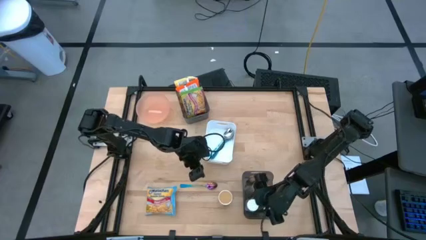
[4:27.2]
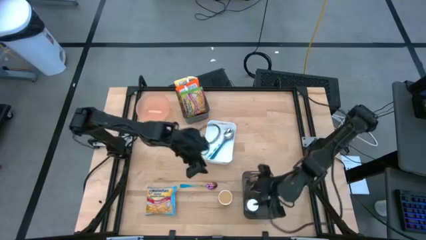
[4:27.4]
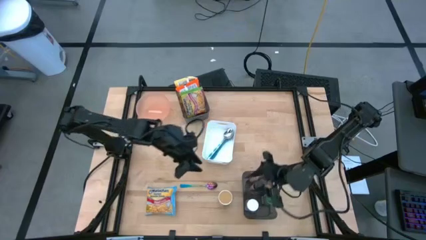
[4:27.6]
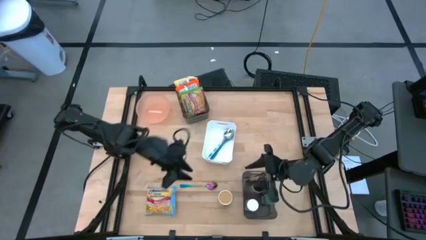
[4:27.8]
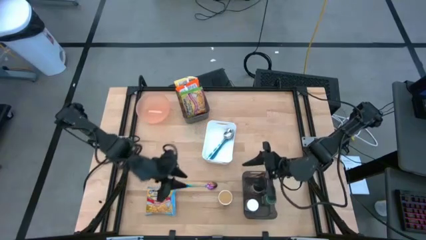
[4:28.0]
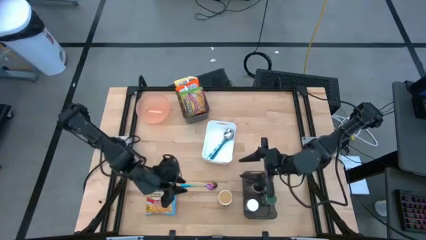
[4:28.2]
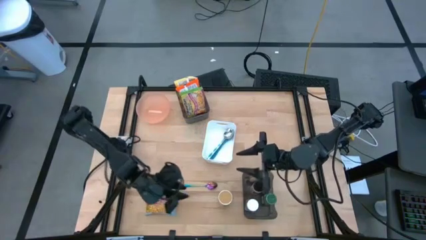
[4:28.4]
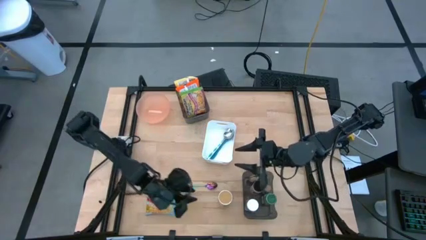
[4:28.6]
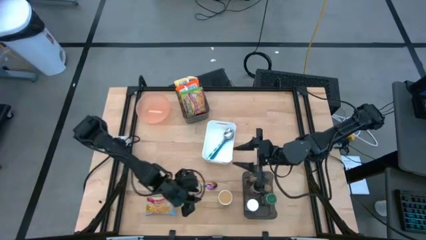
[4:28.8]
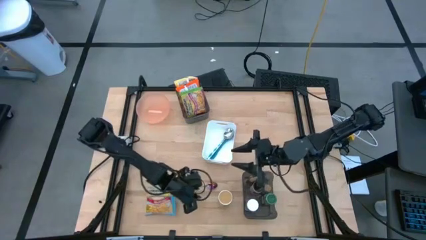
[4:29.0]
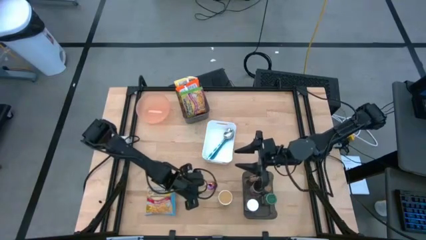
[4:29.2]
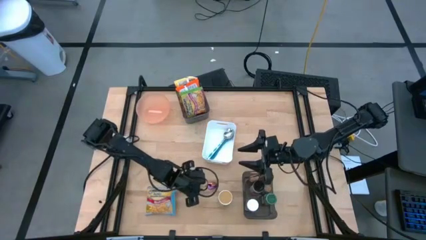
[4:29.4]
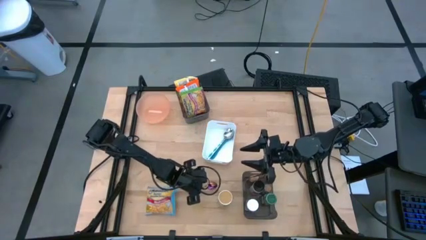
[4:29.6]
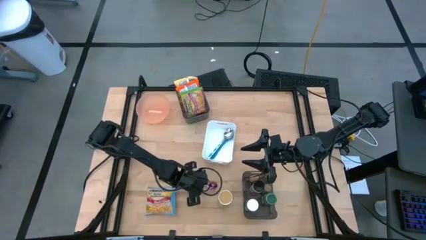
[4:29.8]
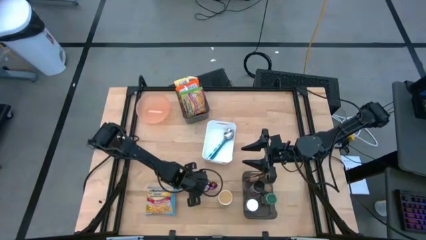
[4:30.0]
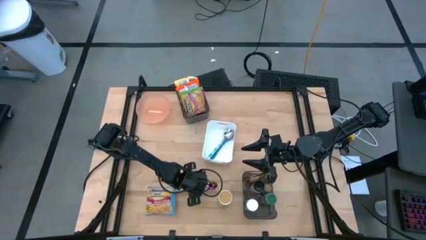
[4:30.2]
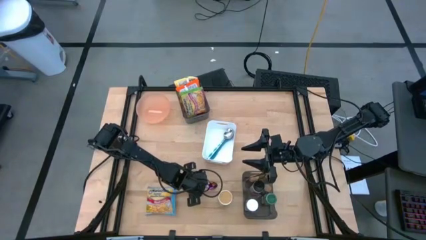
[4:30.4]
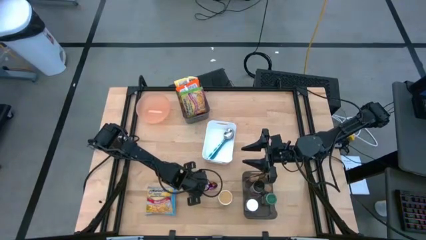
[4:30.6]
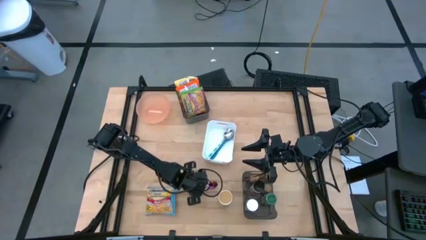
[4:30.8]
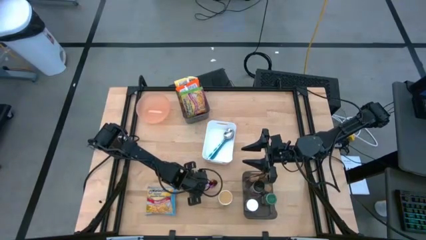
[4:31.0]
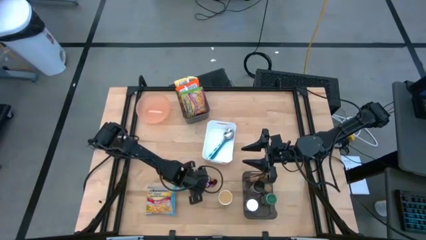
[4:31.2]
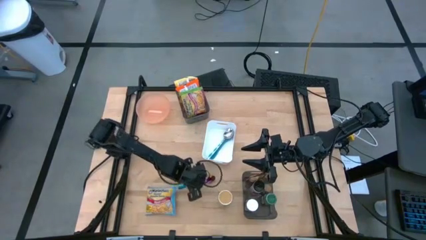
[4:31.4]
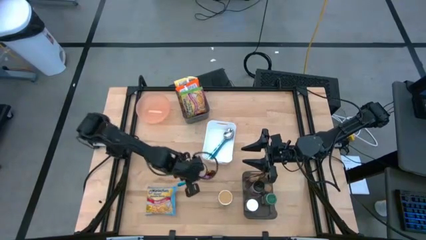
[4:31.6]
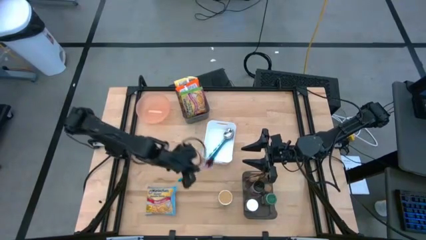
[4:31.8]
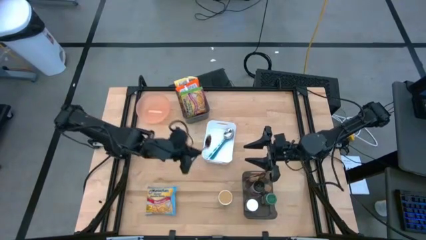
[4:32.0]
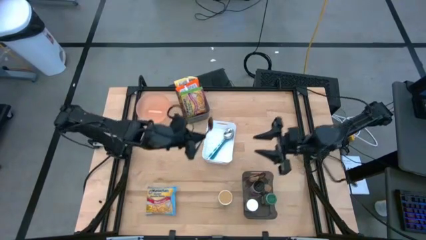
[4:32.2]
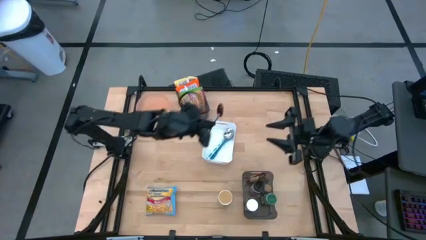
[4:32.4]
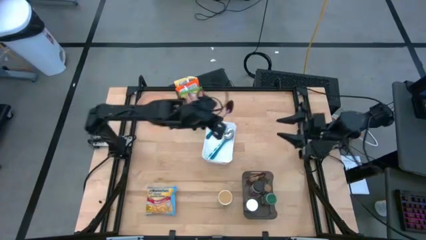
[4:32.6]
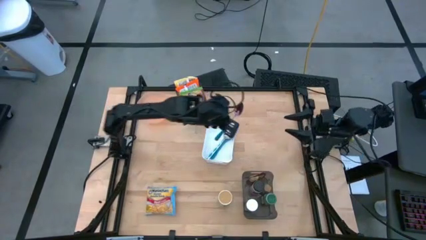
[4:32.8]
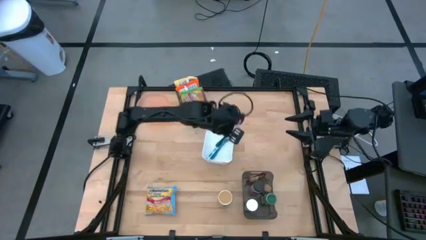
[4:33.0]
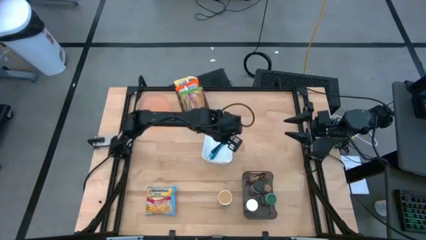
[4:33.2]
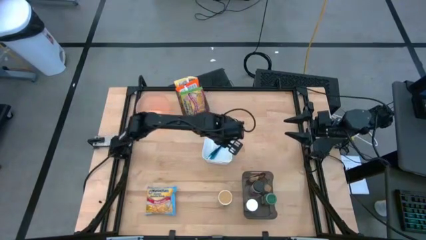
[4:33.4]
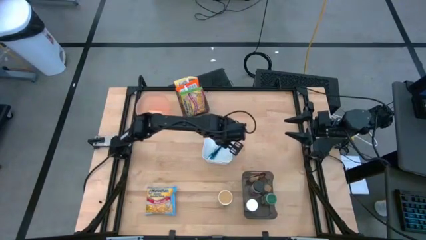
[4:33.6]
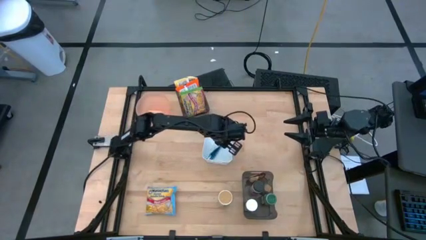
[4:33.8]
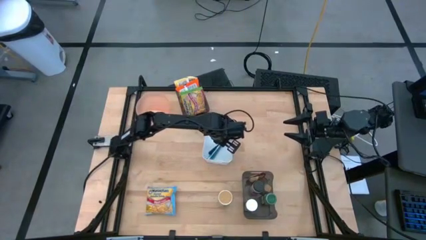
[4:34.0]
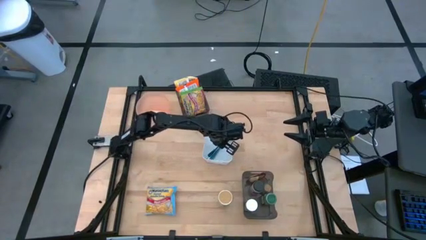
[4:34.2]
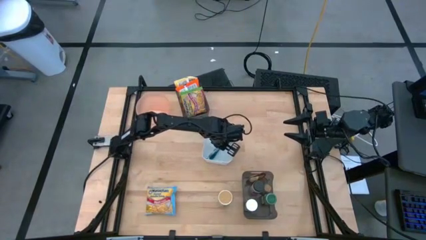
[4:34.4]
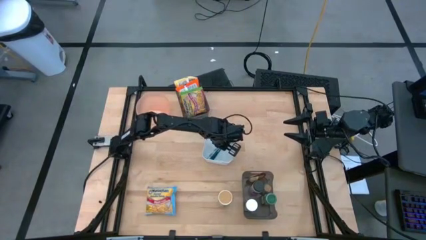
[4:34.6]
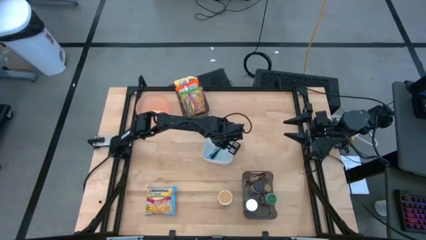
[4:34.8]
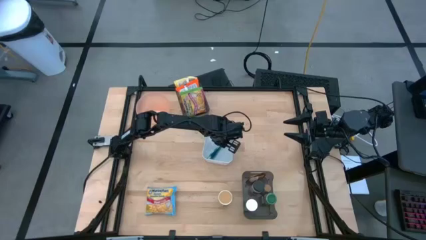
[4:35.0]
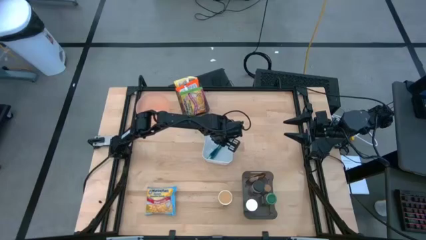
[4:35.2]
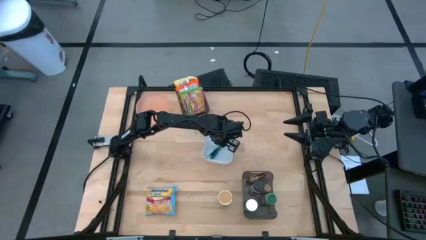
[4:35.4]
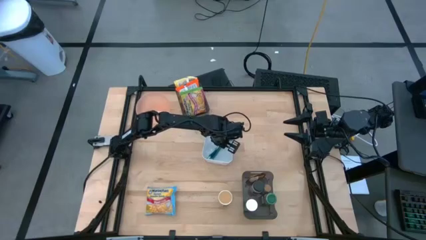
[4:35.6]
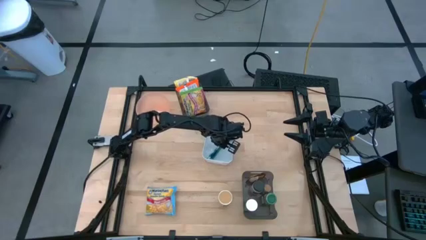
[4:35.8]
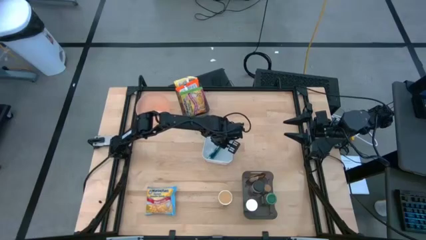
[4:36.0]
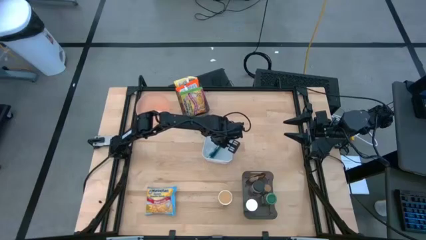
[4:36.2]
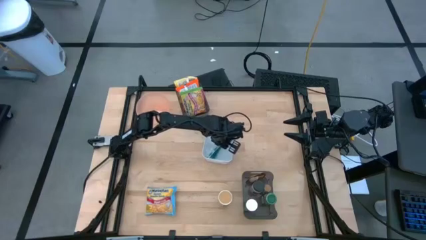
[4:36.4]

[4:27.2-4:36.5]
Task: Pick & Place Food Item
Put the purple spoon into the white bin

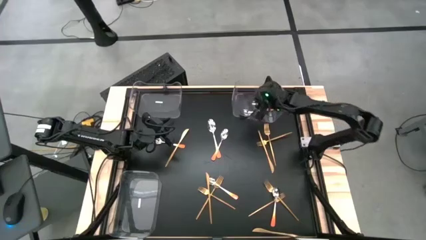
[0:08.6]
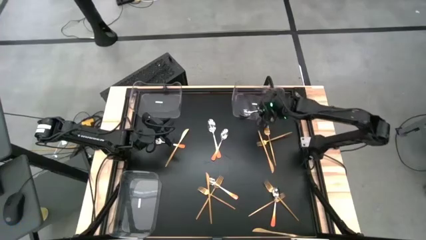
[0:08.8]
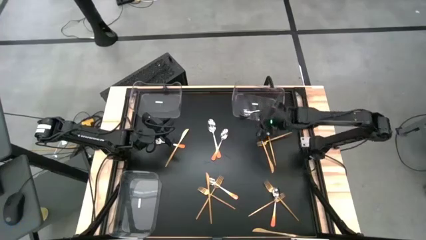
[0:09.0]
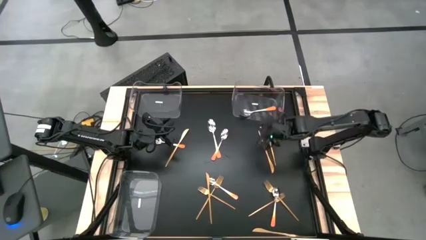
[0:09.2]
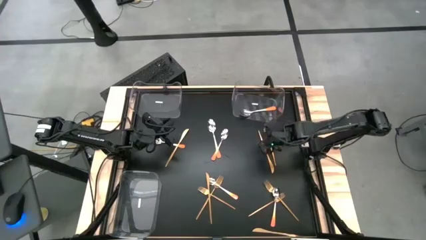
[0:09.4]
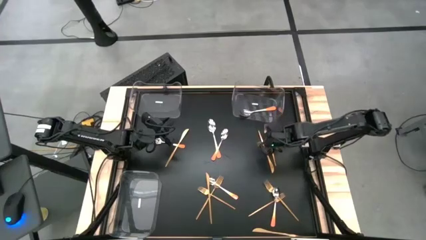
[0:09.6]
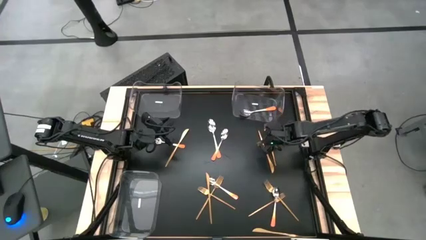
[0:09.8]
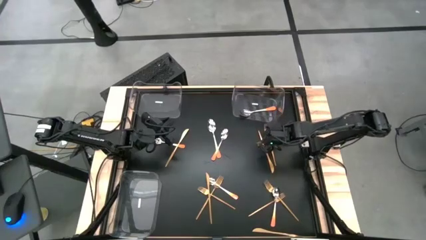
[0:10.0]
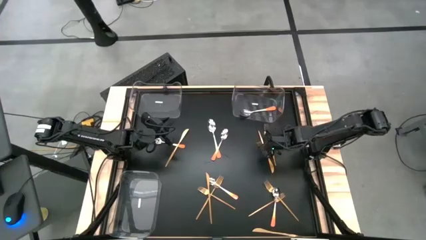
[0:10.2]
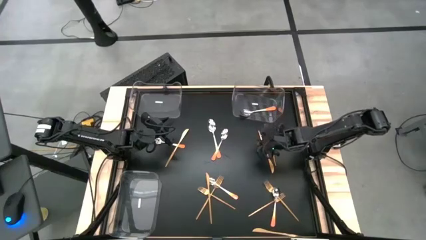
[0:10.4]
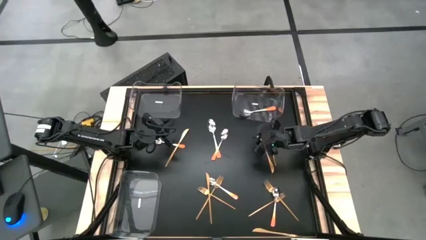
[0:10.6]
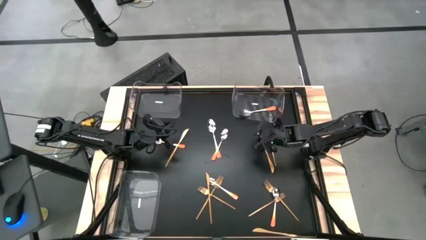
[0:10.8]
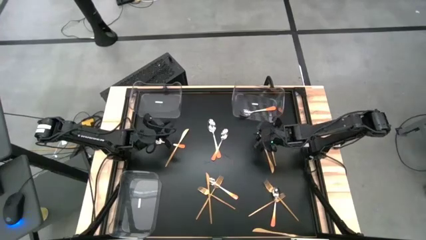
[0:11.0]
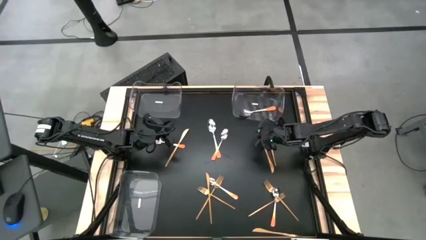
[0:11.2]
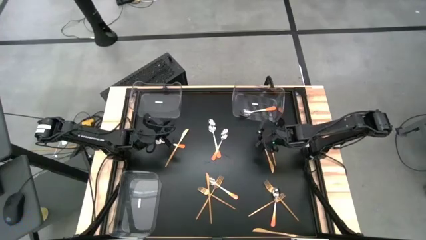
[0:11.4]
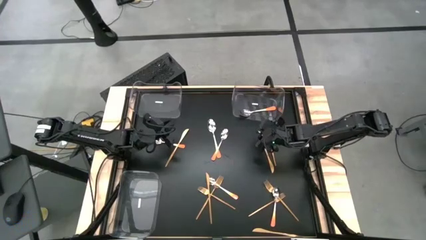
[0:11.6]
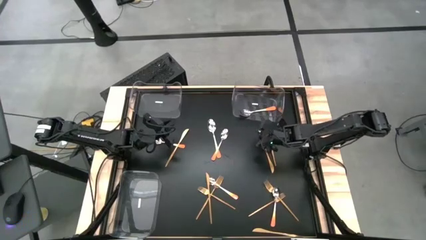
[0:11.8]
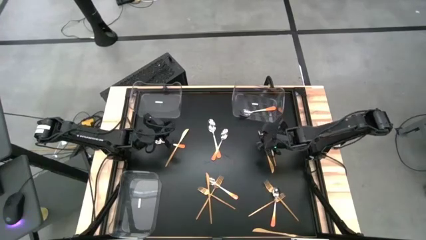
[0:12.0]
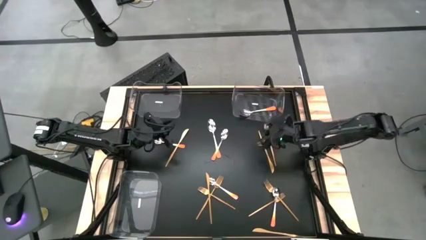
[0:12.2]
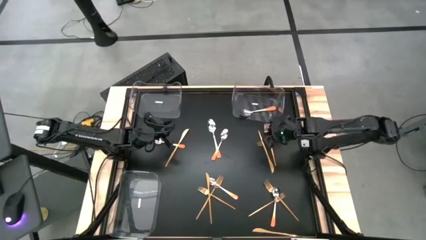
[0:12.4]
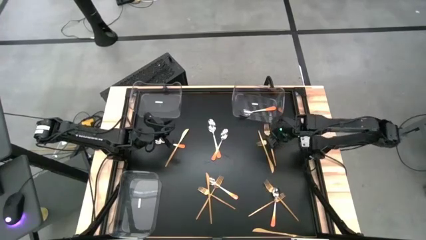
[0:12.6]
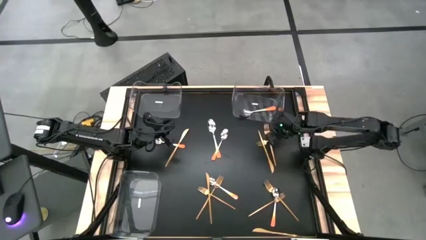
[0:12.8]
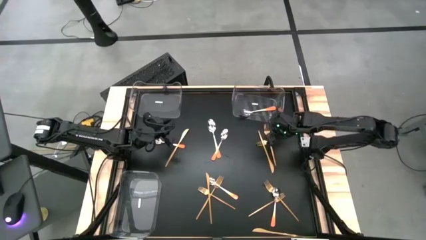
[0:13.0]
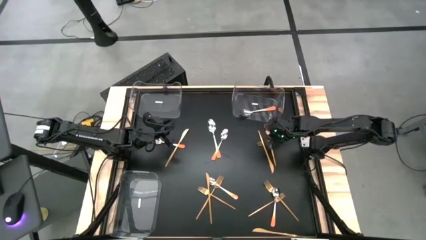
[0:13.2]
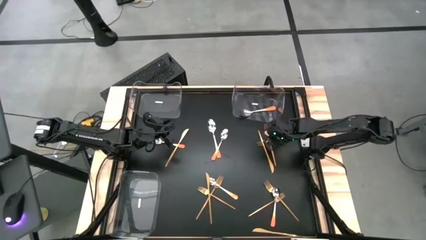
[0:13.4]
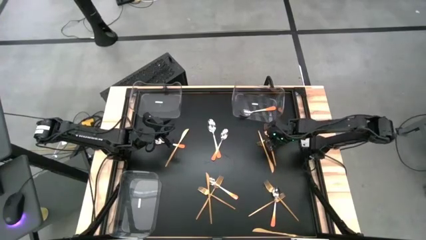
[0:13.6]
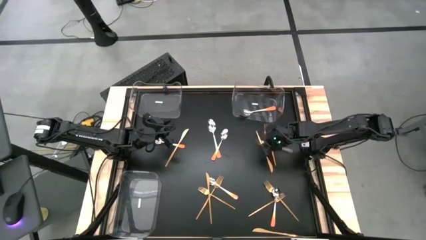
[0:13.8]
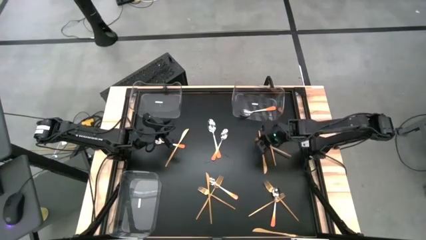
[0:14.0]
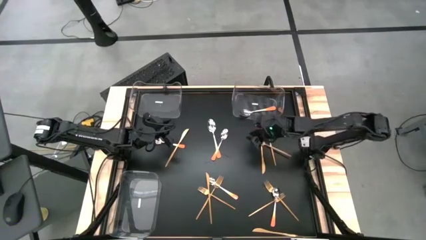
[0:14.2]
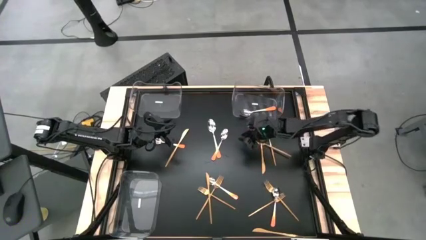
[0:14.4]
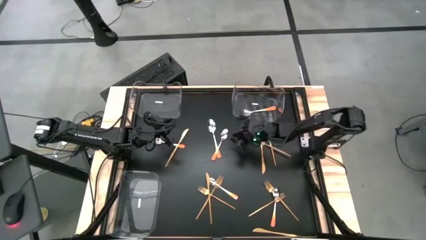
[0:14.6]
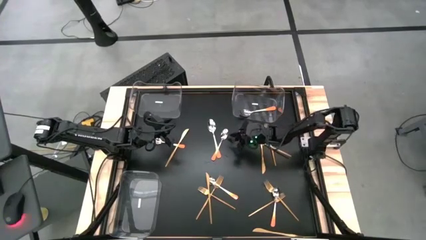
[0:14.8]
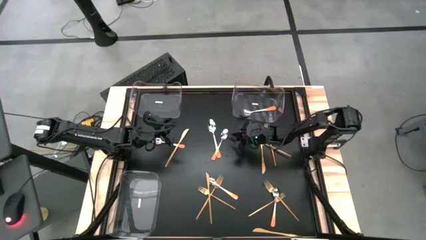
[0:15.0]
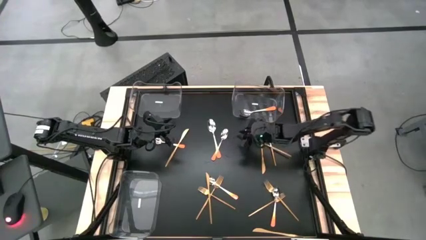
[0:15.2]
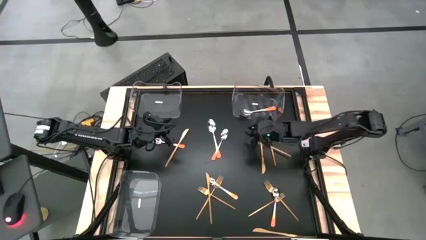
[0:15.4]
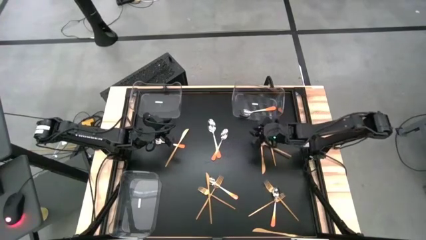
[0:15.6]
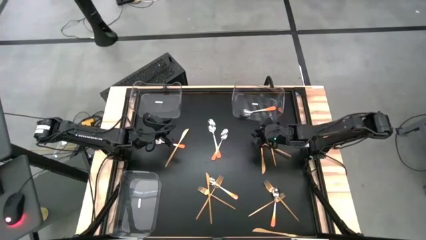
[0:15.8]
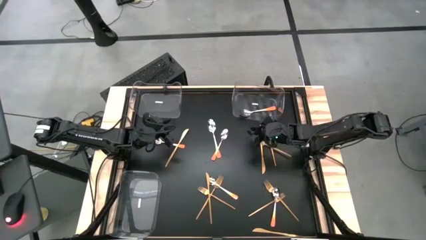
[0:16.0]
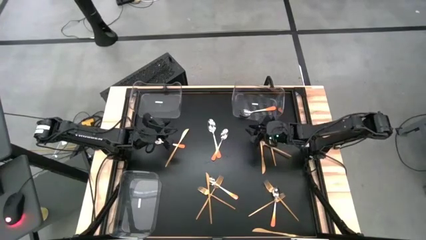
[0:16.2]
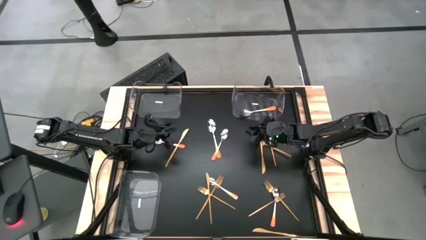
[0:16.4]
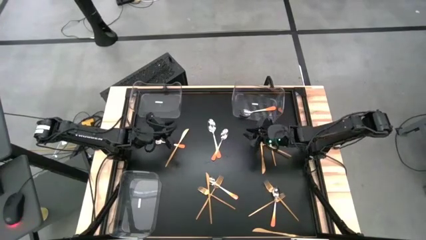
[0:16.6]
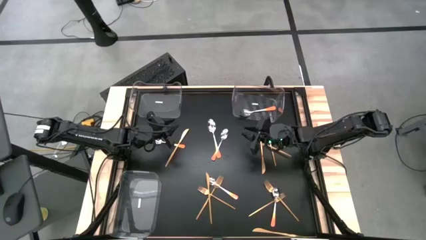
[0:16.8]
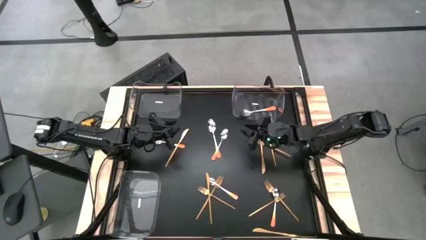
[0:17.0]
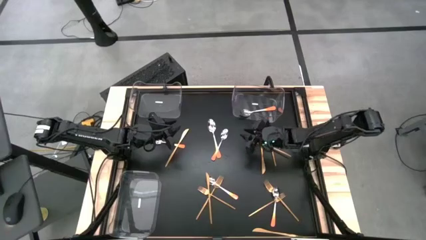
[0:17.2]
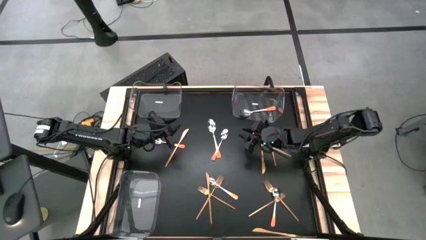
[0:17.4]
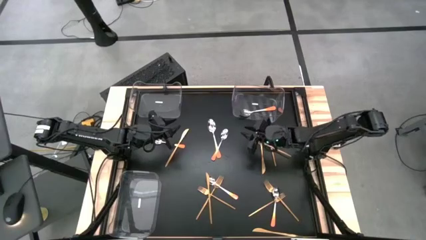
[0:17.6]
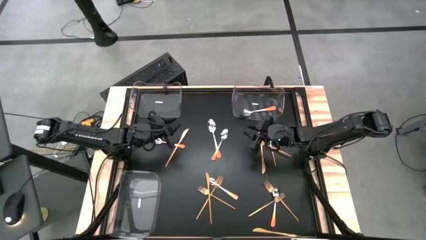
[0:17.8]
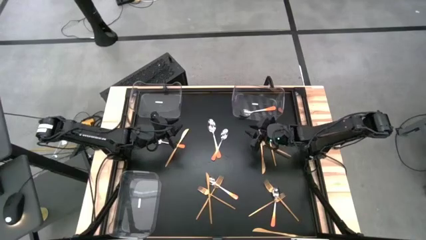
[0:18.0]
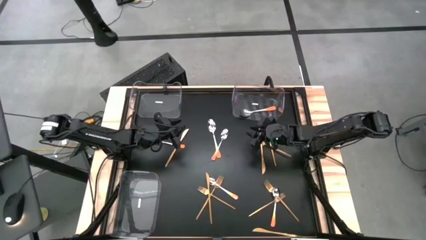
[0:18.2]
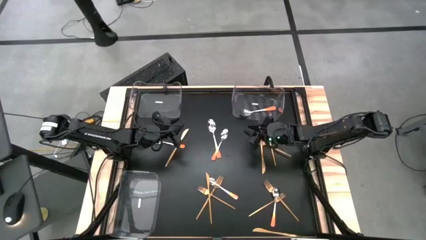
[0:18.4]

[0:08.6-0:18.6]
Task: Sort silverware by color (type)
Put the silver and orange spoon into the top left transparent bin
